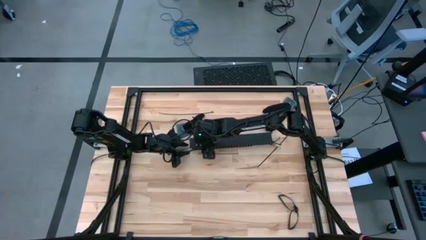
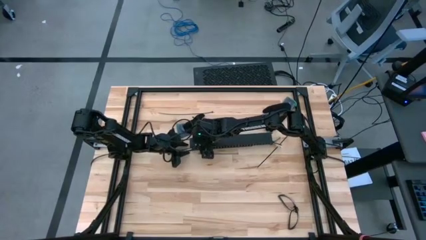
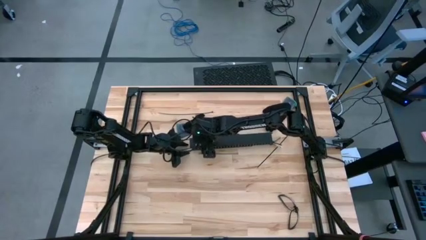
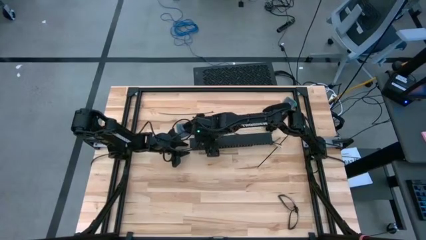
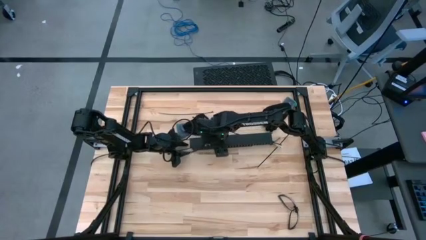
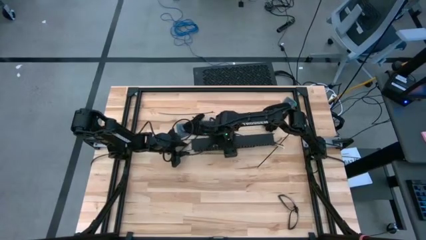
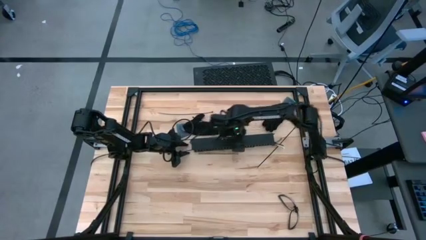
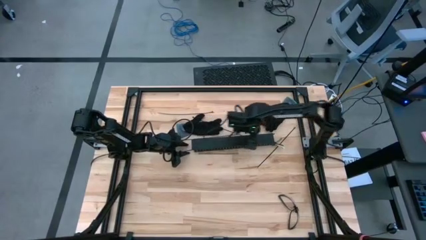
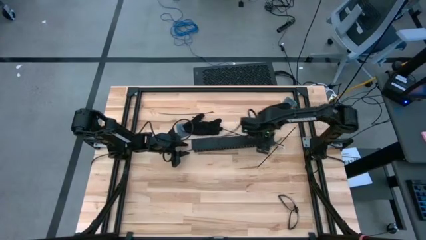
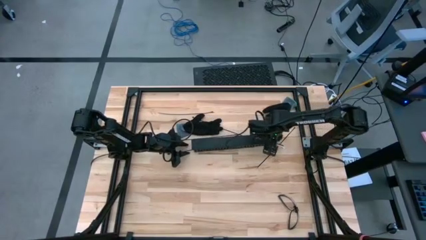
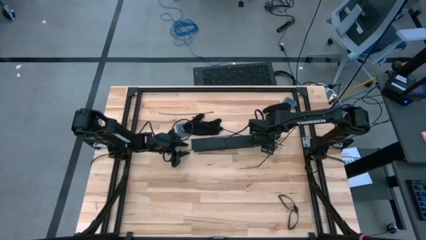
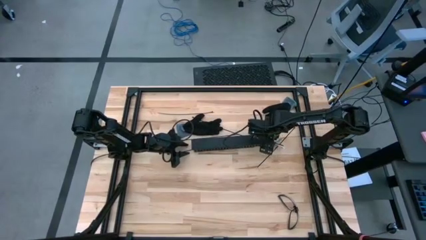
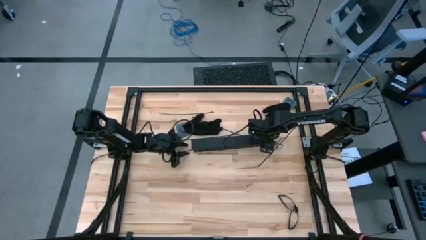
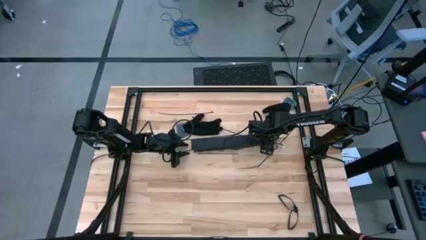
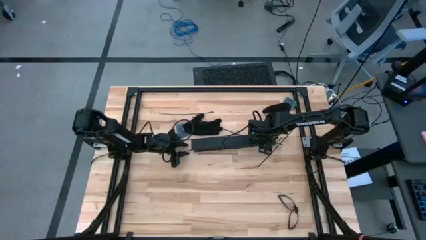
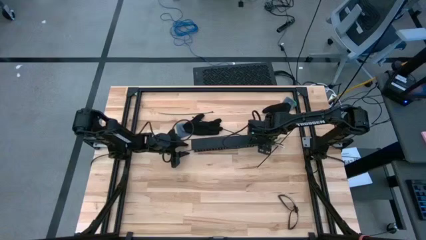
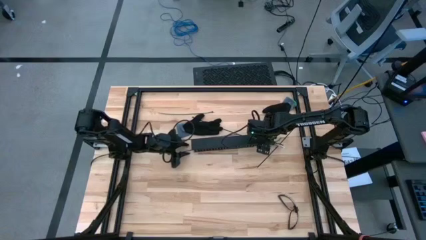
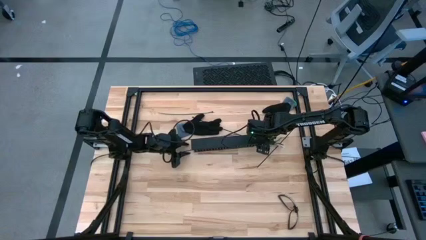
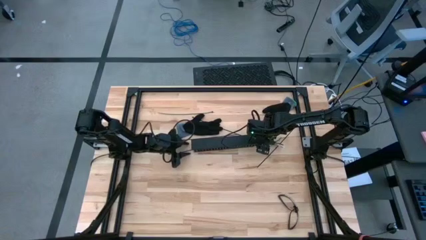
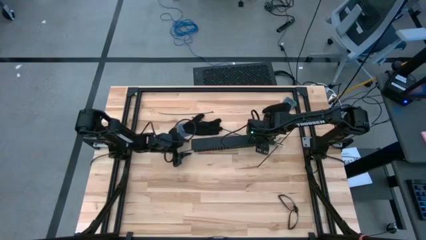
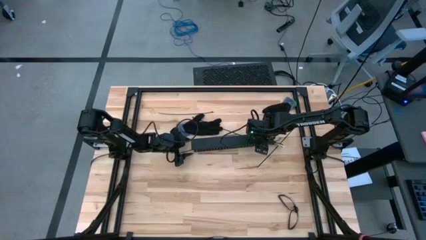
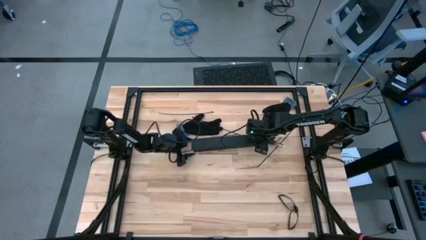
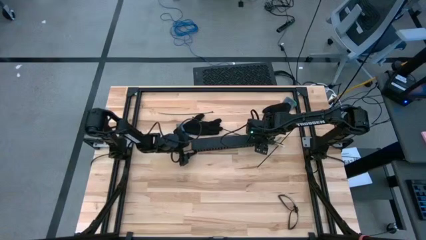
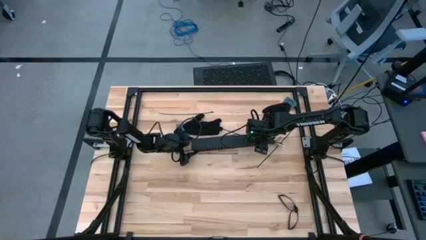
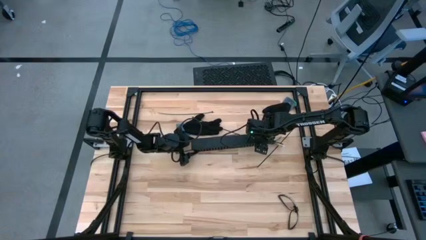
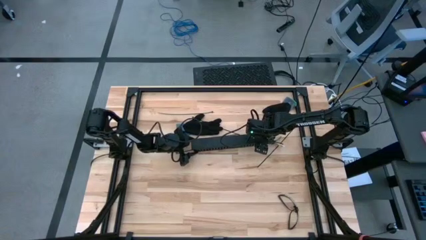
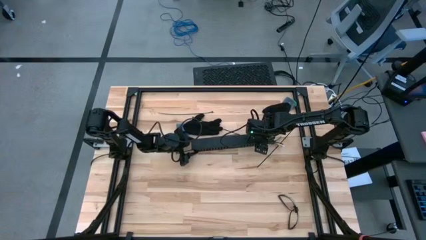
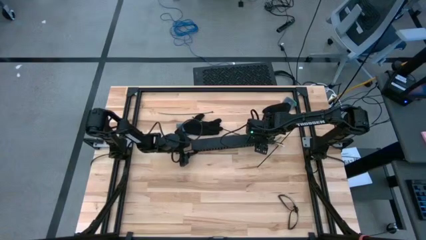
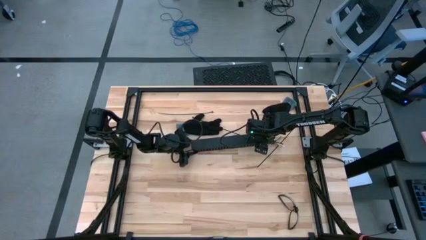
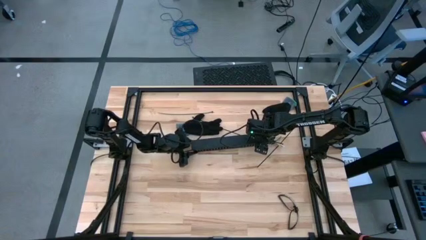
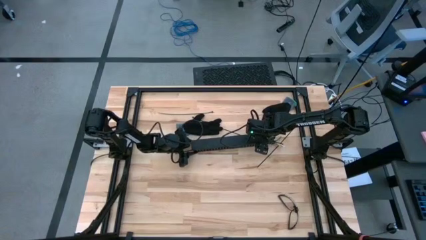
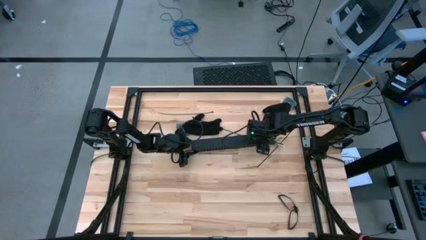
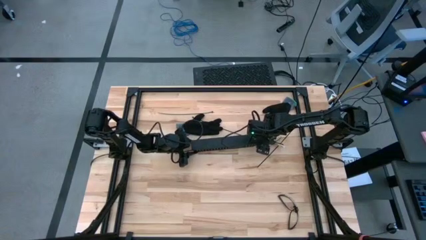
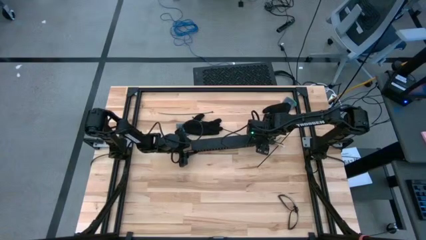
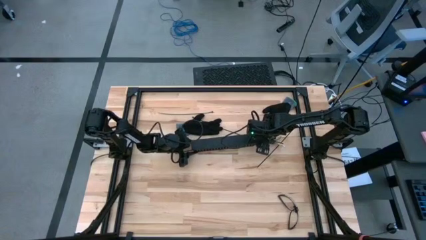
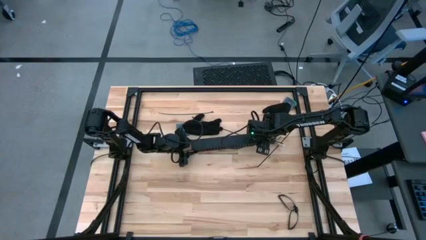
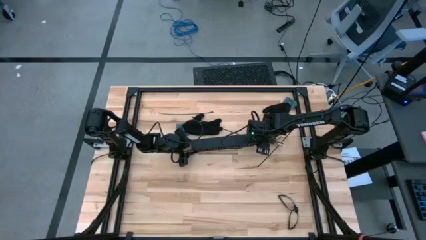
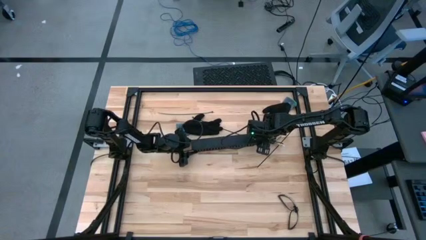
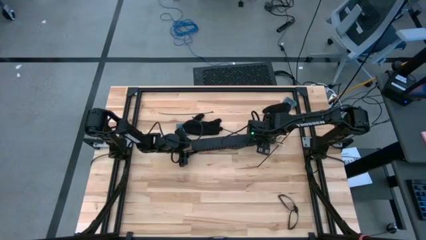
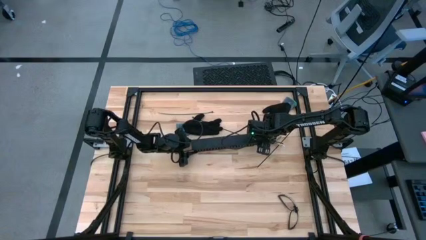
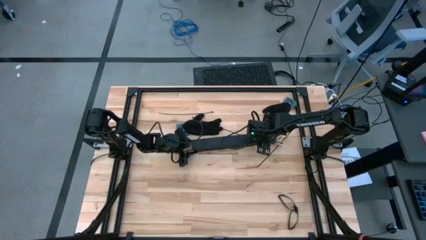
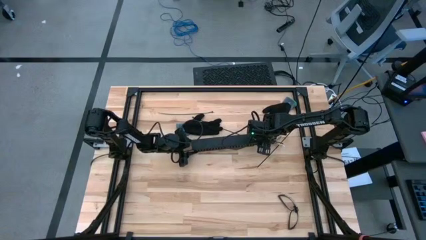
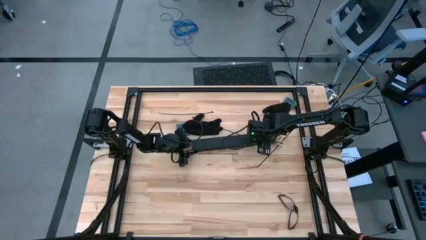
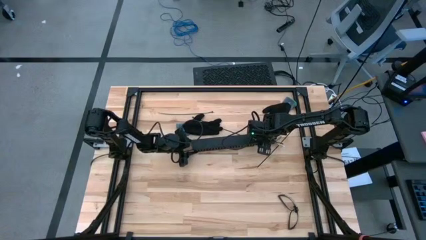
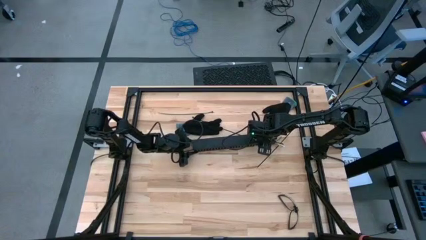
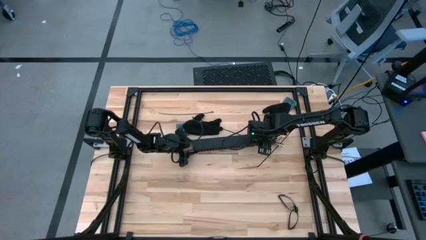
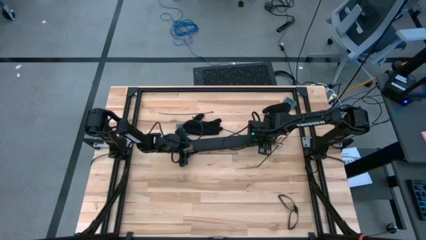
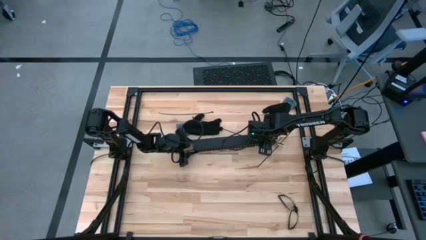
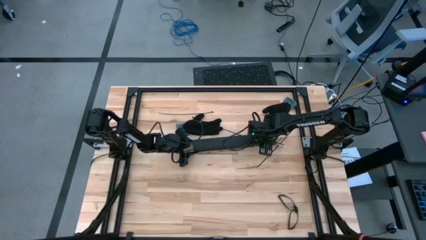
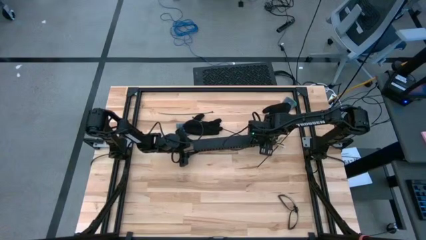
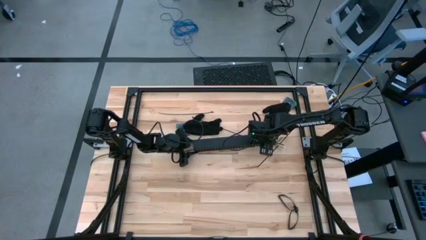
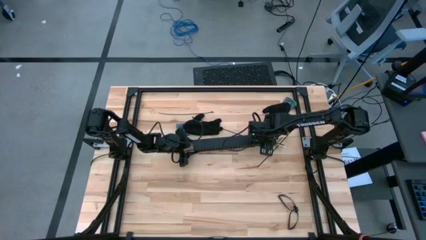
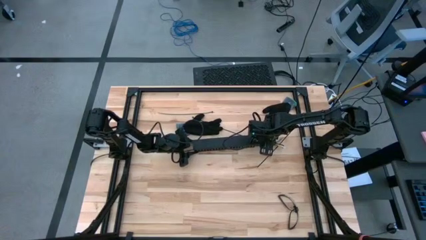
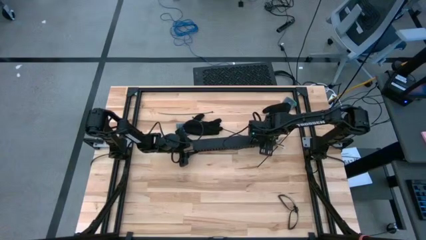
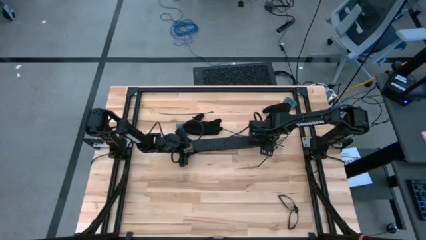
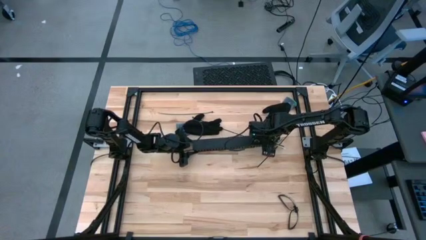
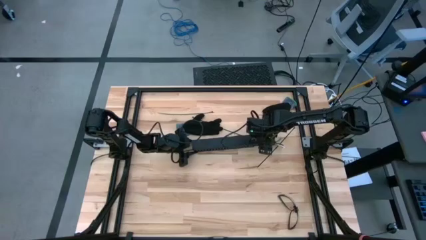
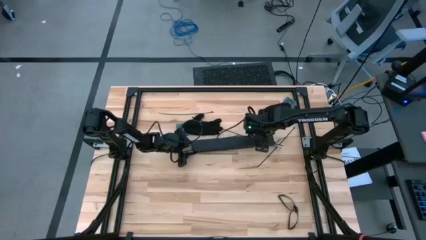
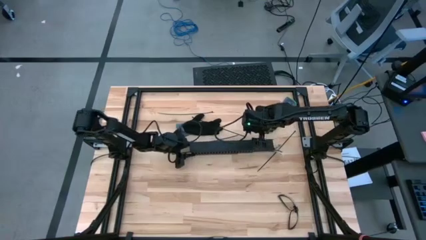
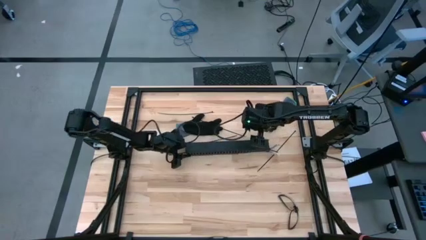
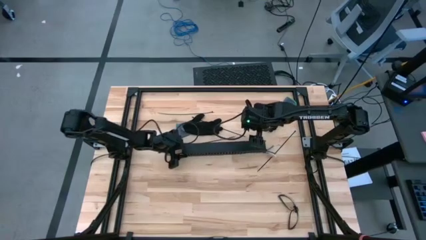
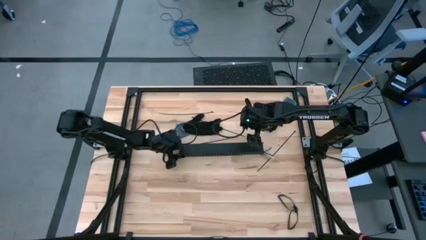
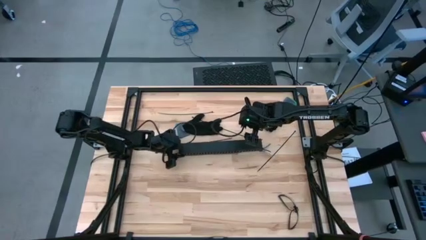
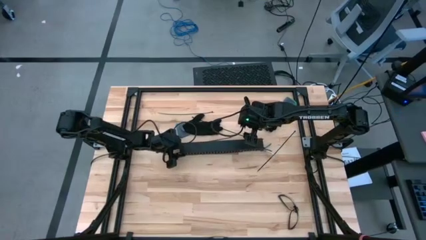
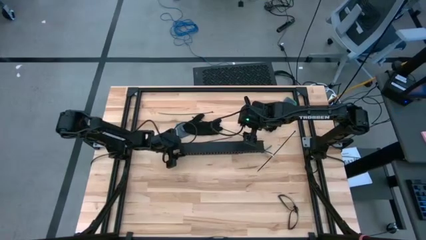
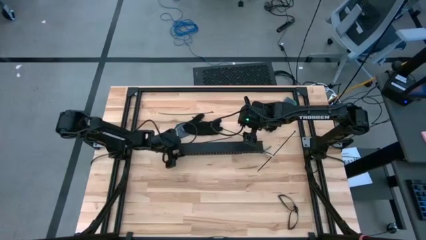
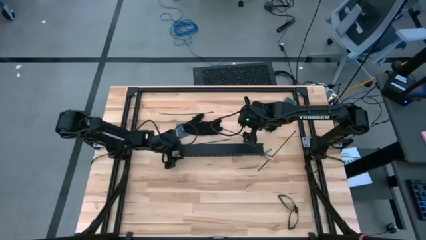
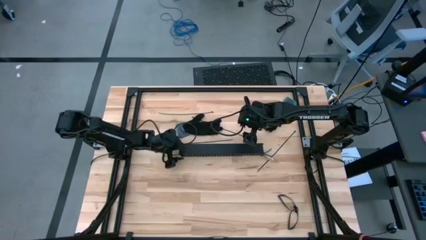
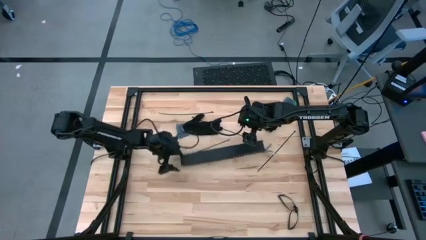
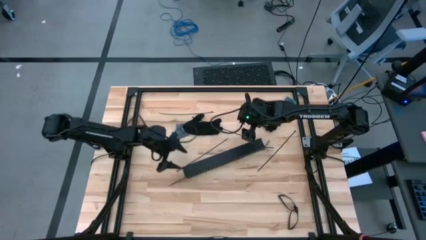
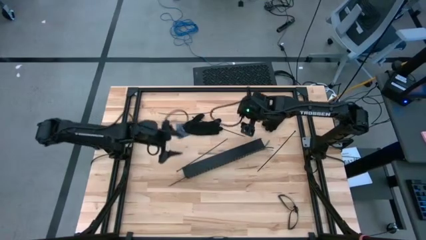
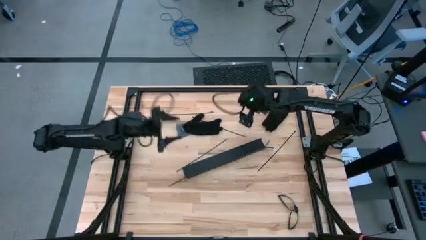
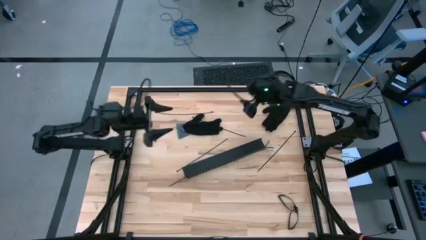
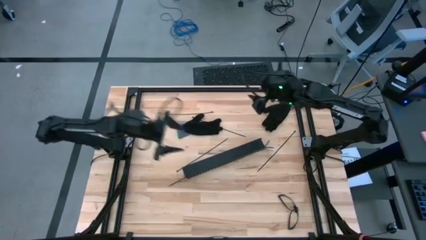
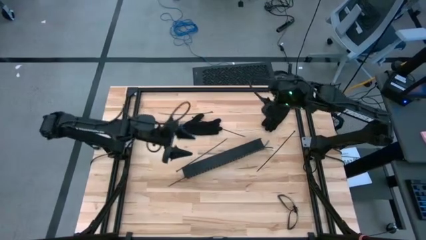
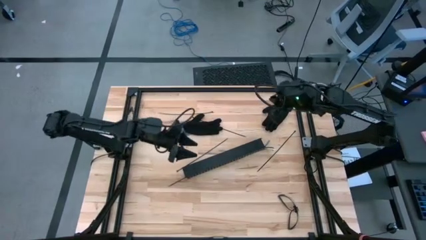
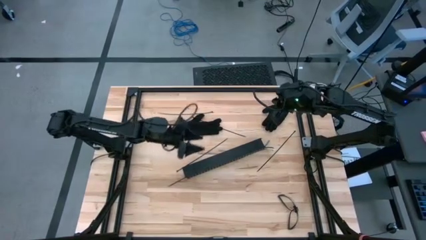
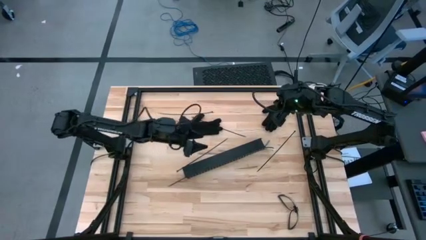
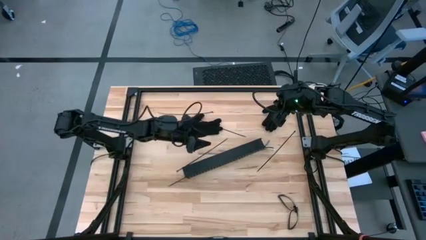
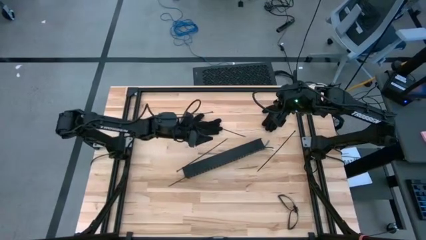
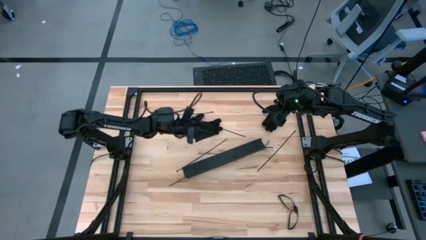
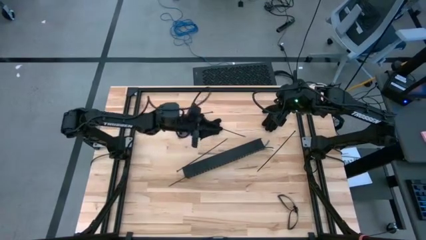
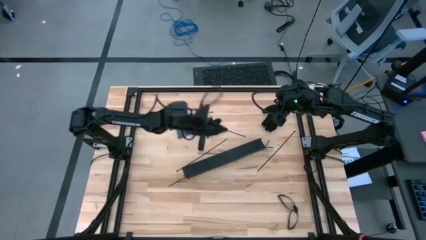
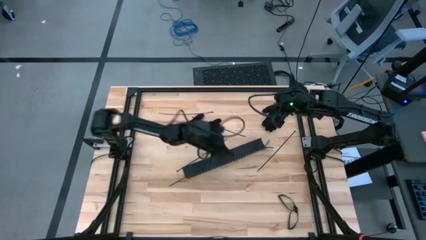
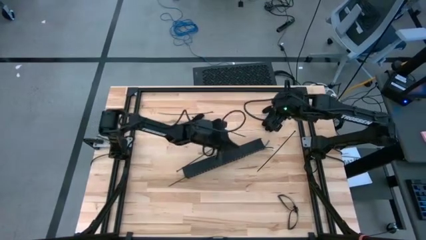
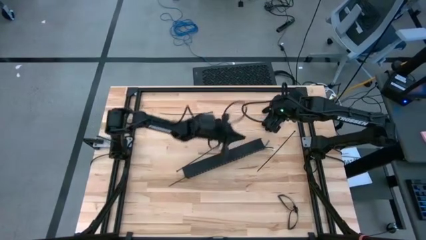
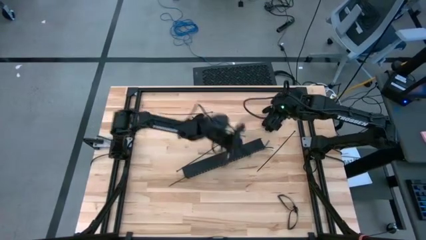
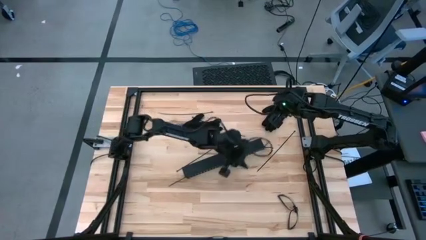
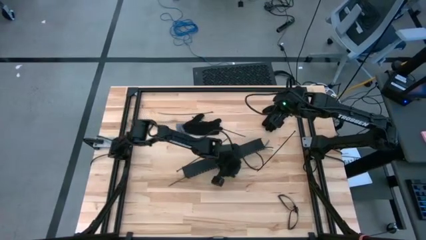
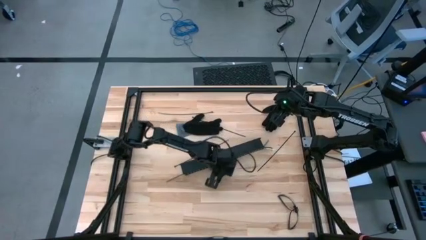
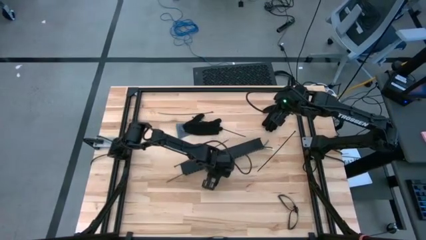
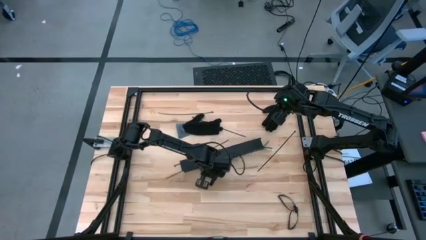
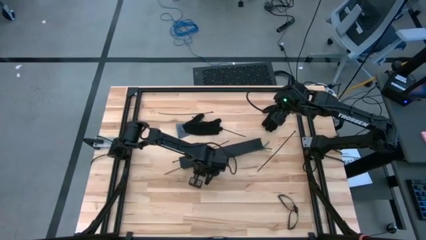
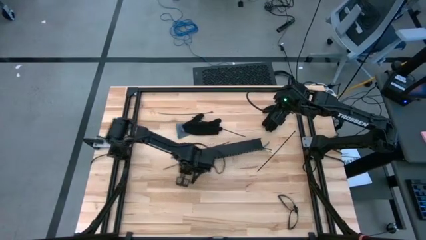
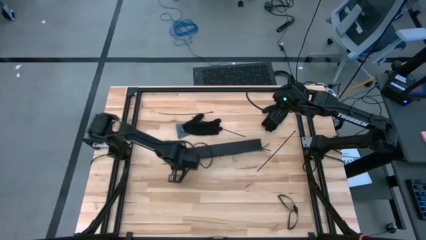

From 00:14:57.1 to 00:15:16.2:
Task: Ziptie cables
Close the cable duct
